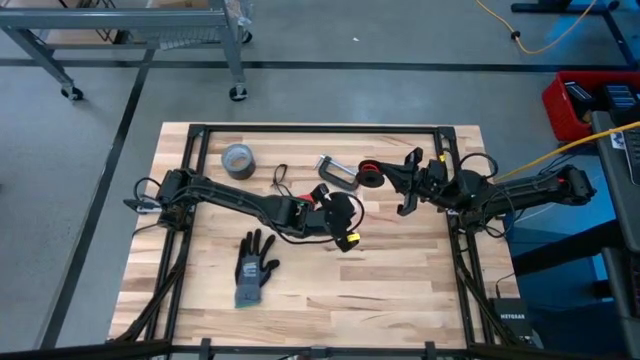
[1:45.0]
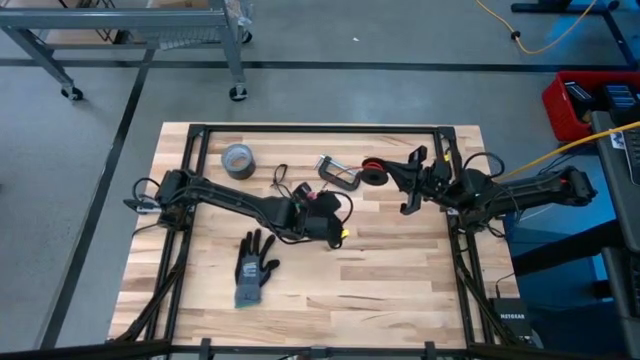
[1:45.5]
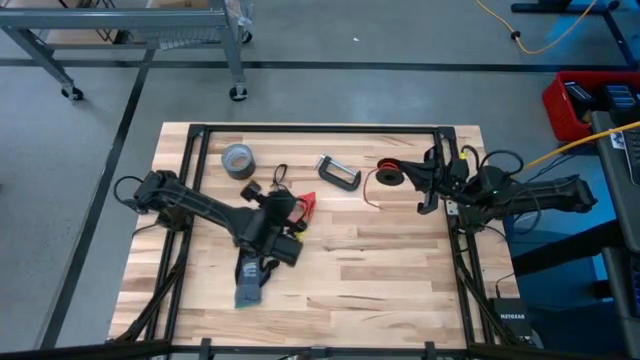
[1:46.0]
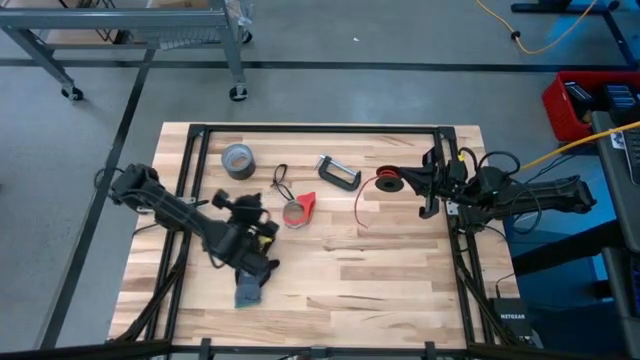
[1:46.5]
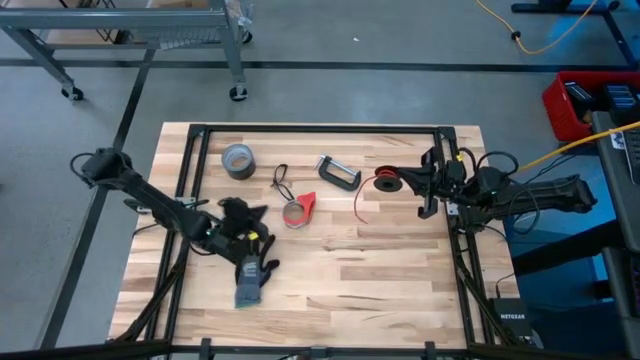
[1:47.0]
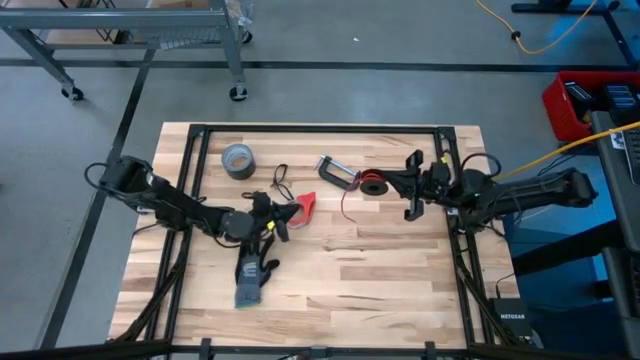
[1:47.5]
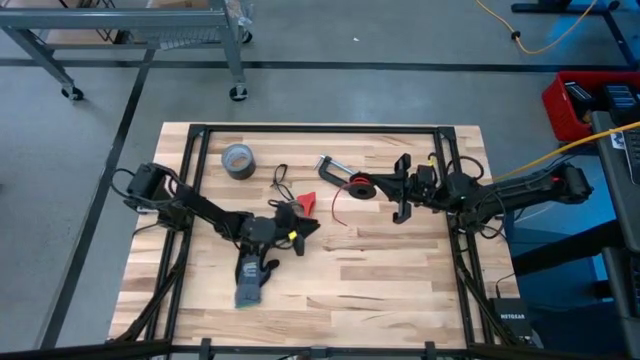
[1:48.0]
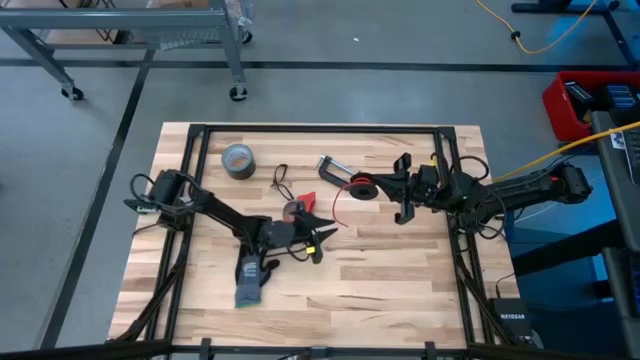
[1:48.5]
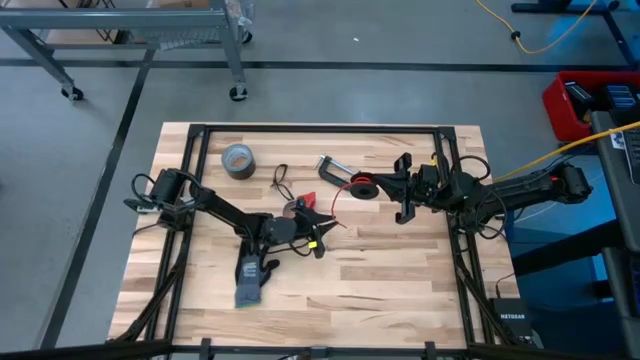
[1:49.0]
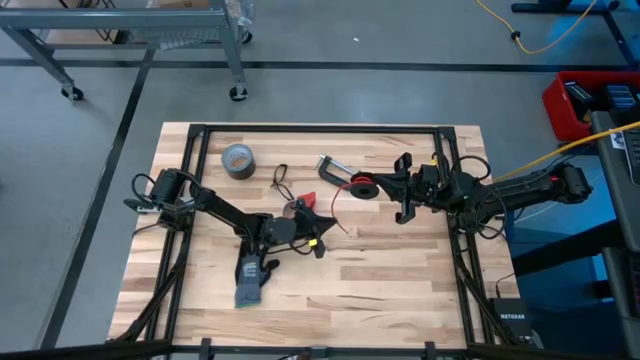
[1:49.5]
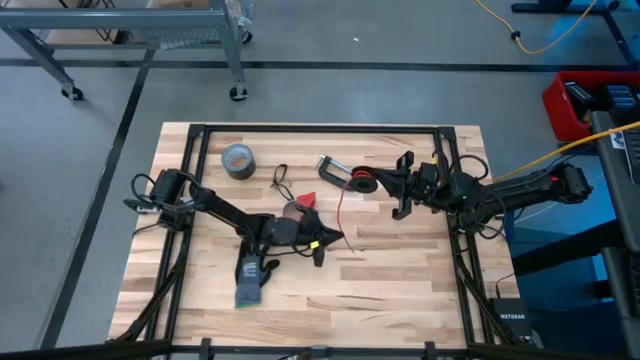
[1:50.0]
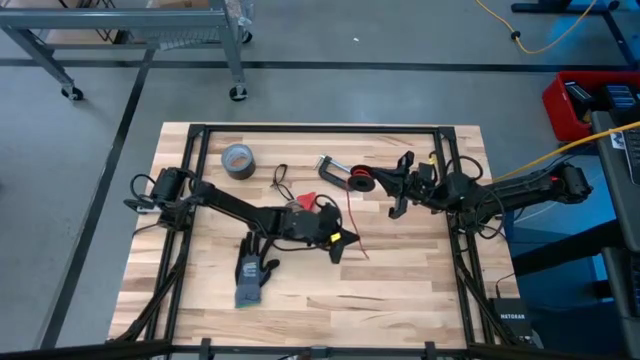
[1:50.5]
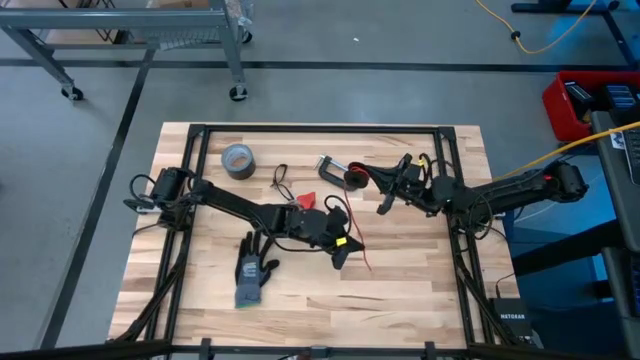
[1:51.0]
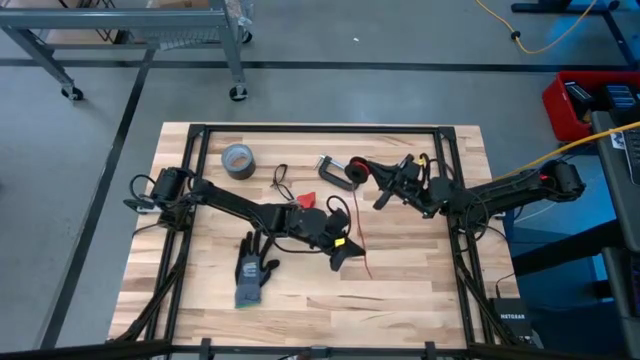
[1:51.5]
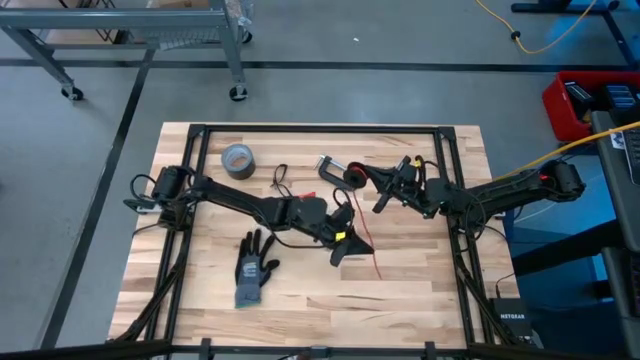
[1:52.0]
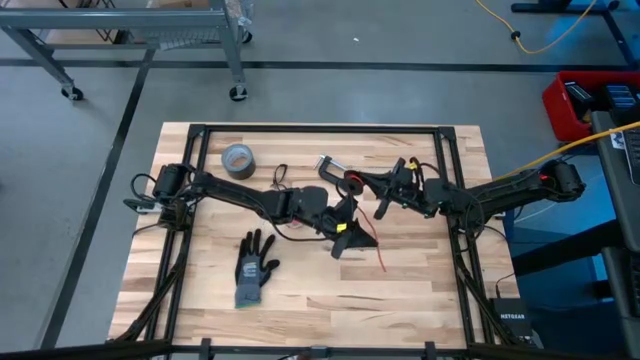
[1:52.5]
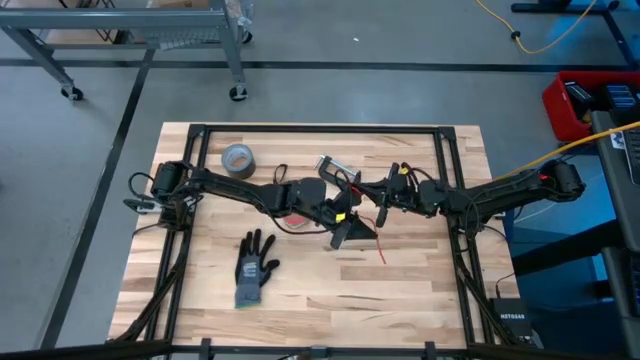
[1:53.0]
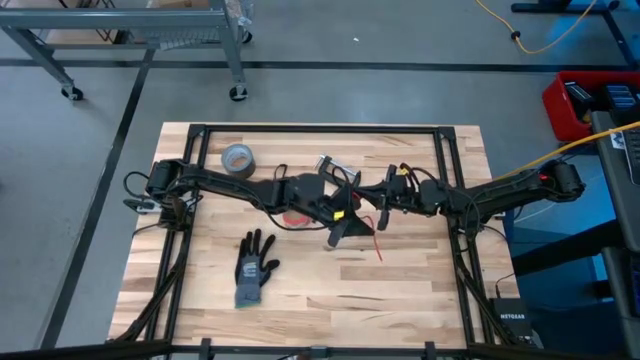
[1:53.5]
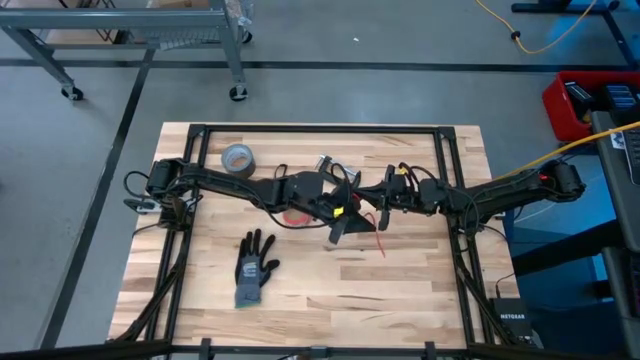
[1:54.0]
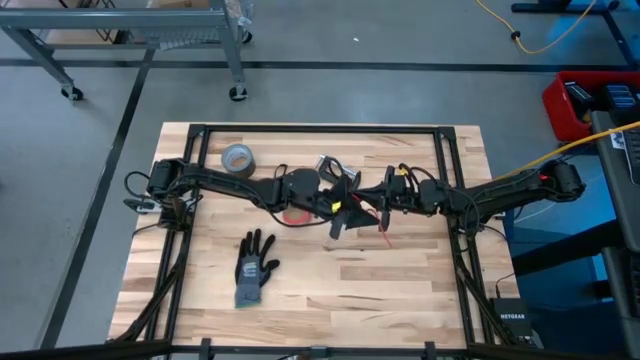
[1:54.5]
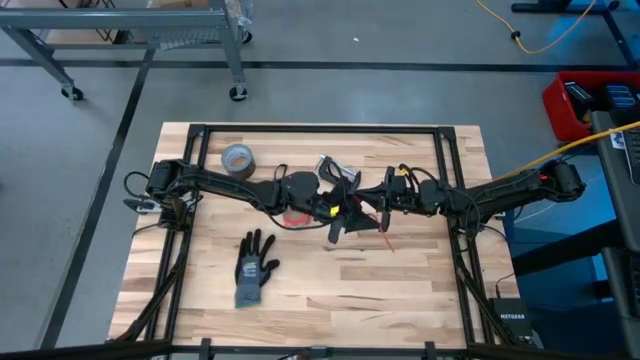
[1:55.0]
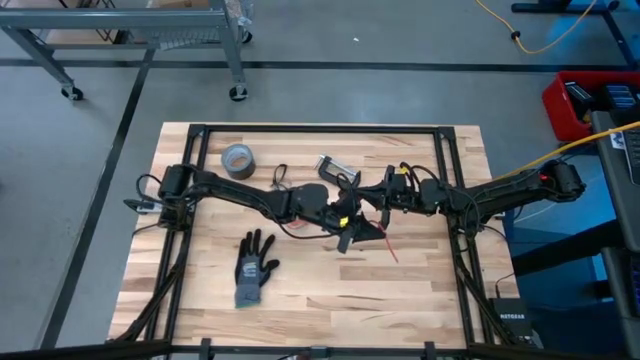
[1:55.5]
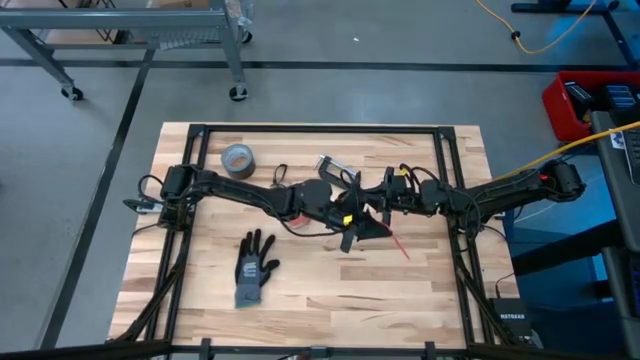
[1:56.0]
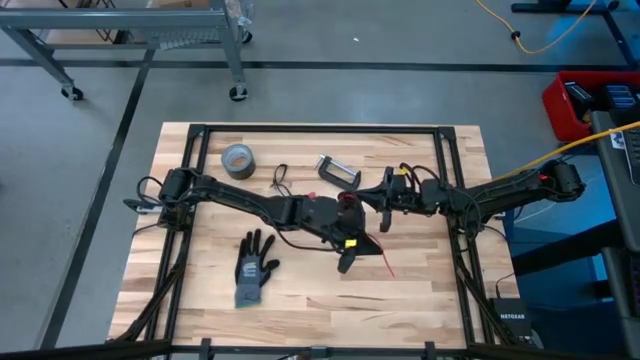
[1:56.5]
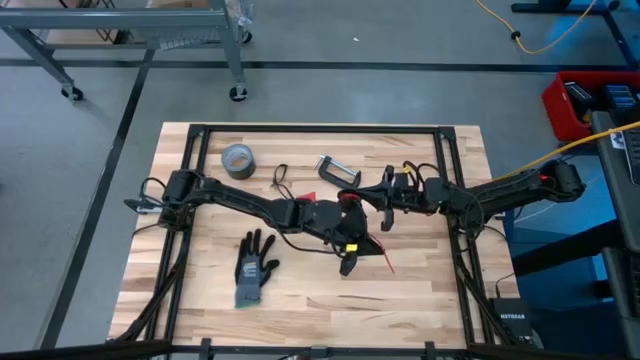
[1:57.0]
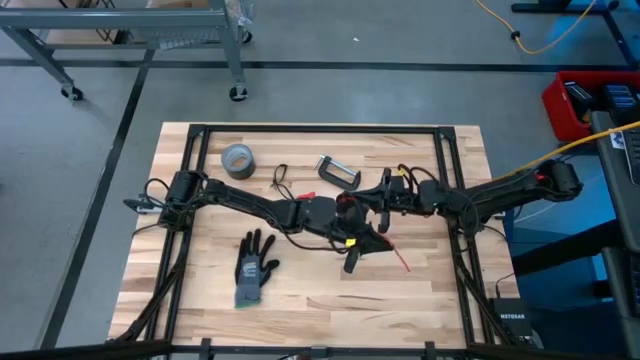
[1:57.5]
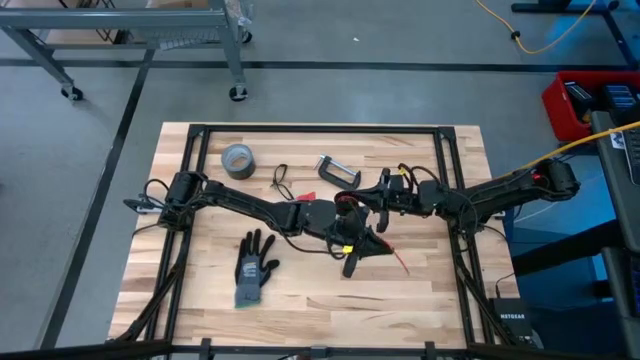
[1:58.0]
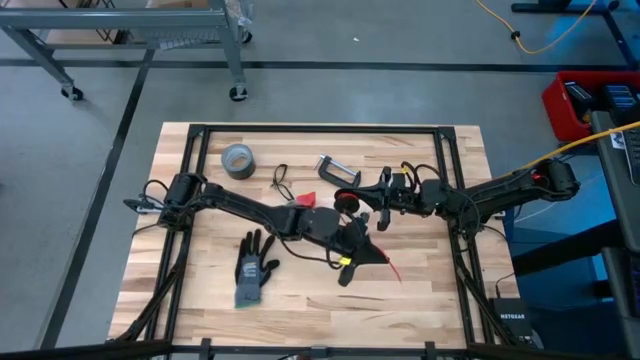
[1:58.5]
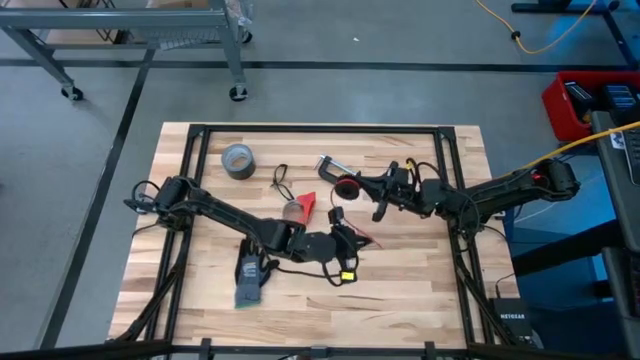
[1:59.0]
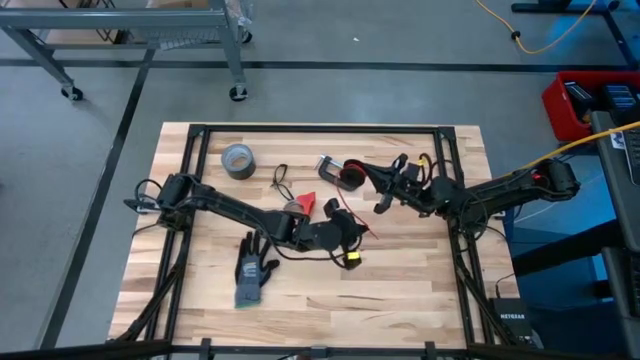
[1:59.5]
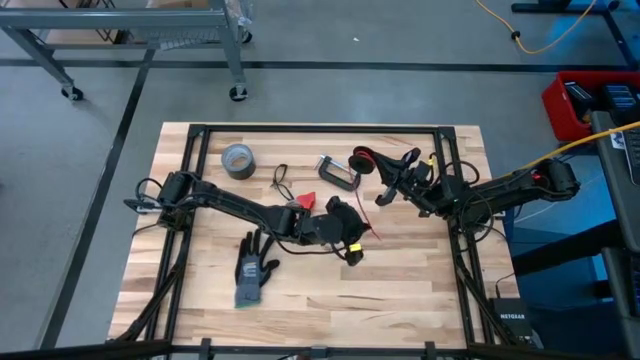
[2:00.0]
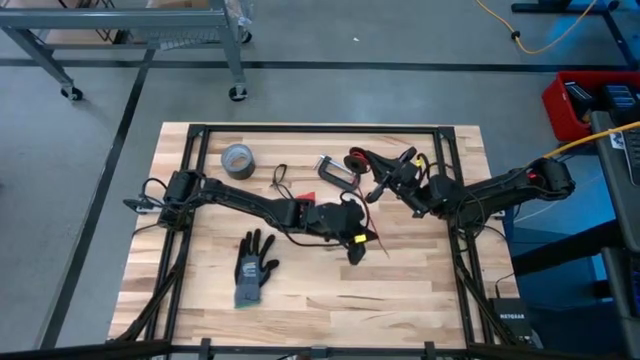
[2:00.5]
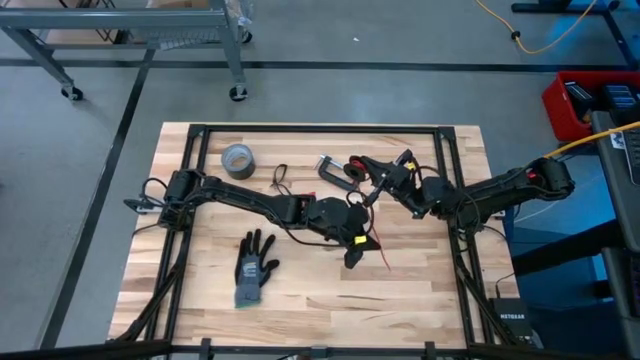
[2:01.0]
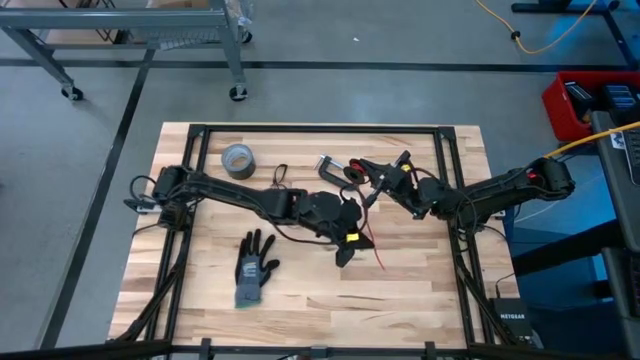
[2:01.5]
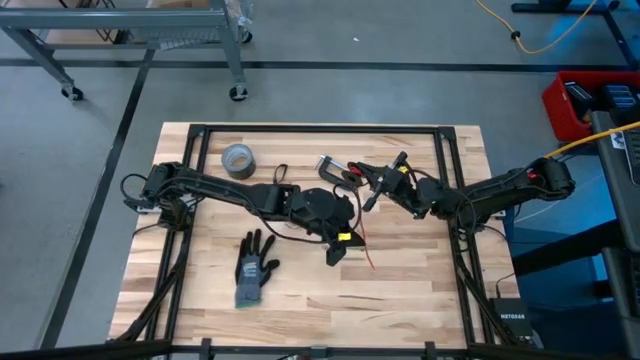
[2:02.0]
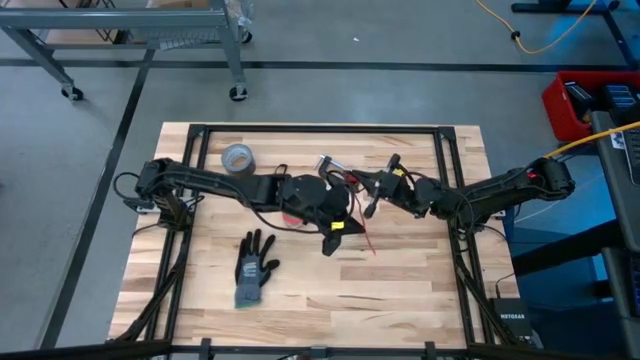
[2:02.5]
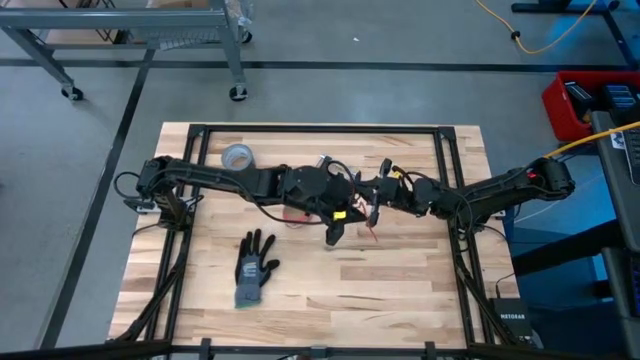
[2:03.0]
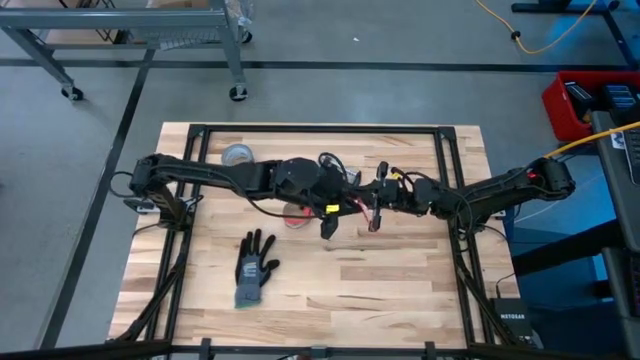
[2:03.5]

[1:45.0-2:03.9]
Task: Coil cords
Coil the red wire onto the spool
